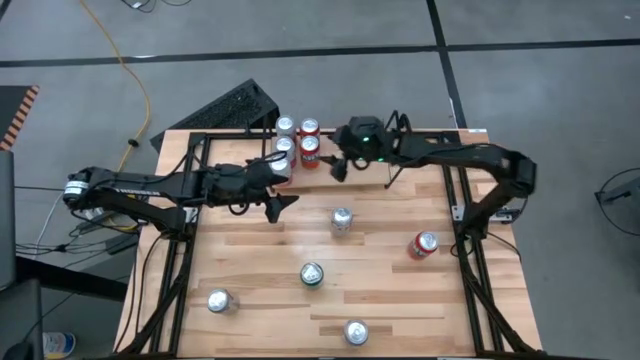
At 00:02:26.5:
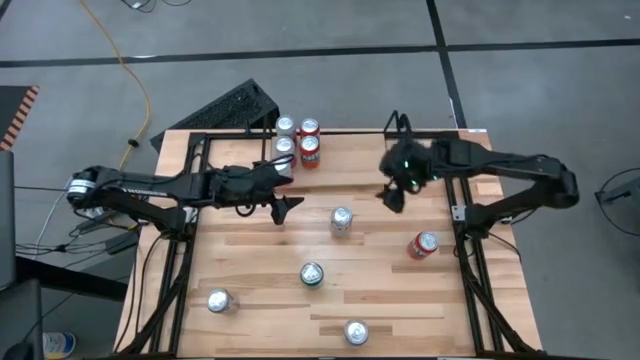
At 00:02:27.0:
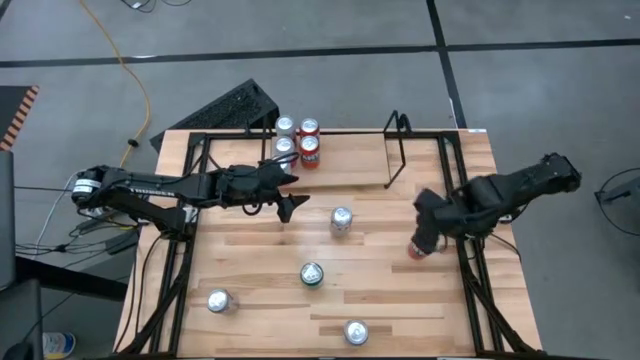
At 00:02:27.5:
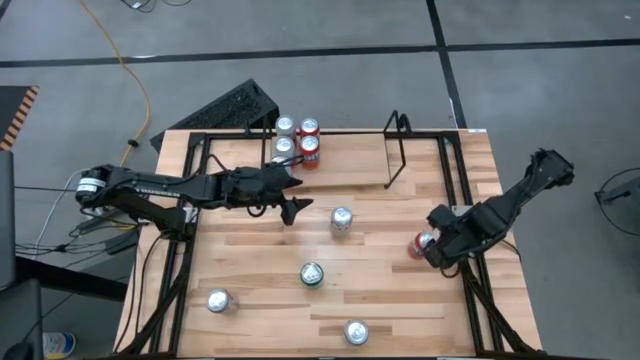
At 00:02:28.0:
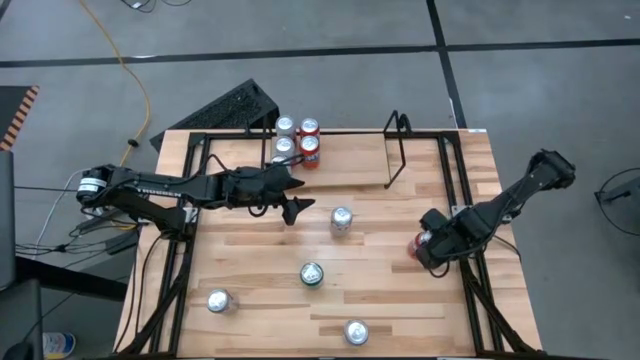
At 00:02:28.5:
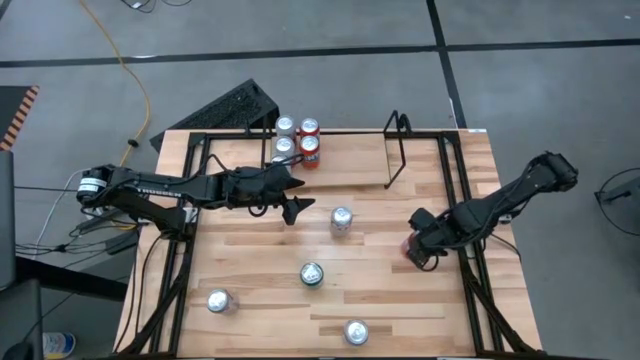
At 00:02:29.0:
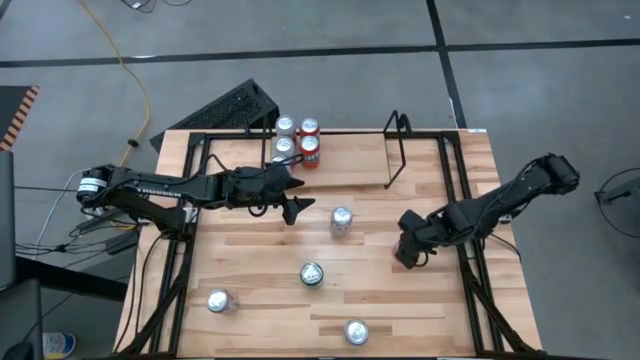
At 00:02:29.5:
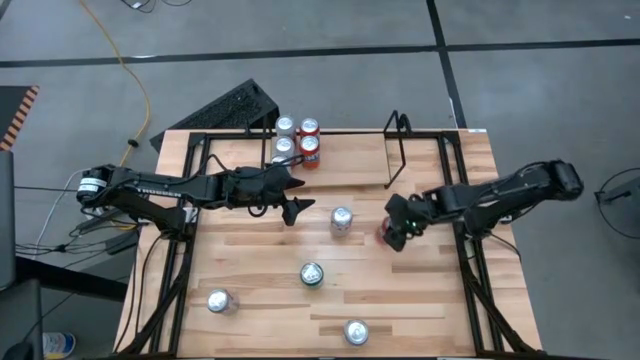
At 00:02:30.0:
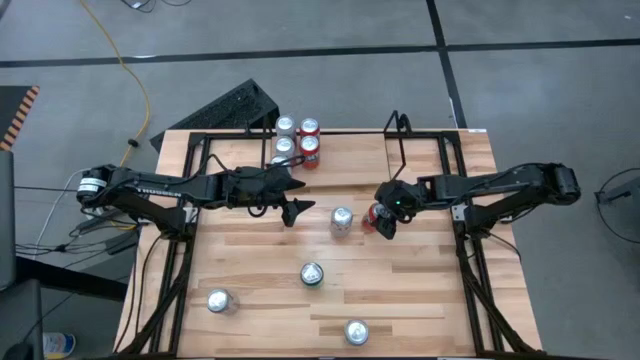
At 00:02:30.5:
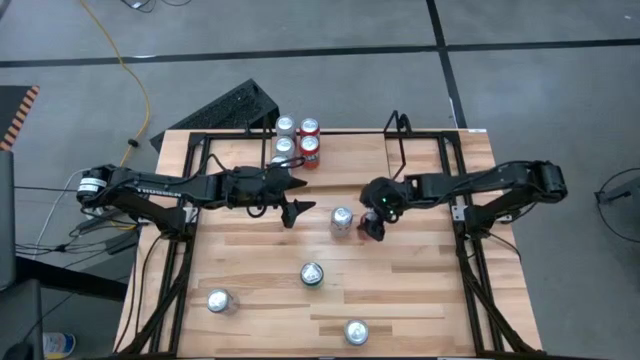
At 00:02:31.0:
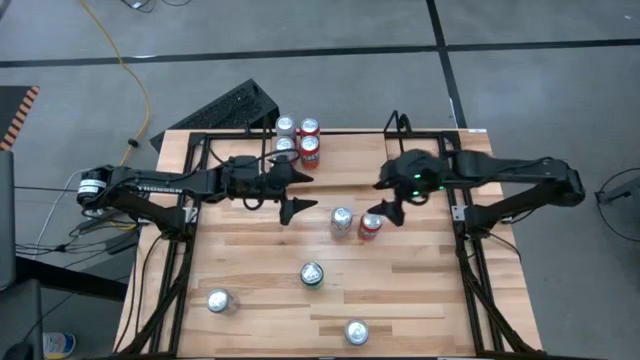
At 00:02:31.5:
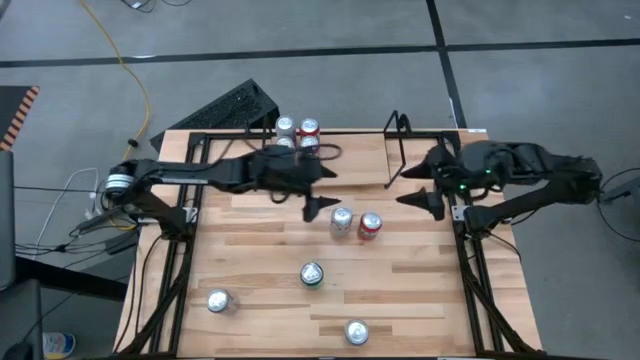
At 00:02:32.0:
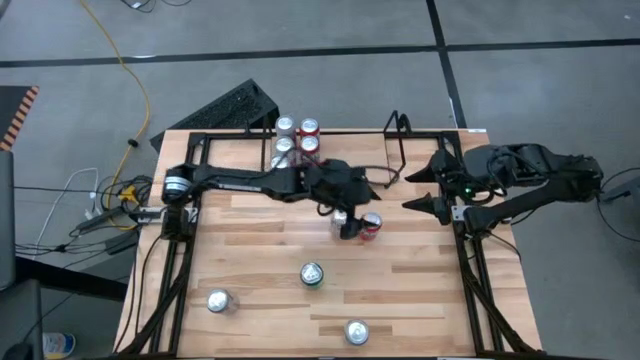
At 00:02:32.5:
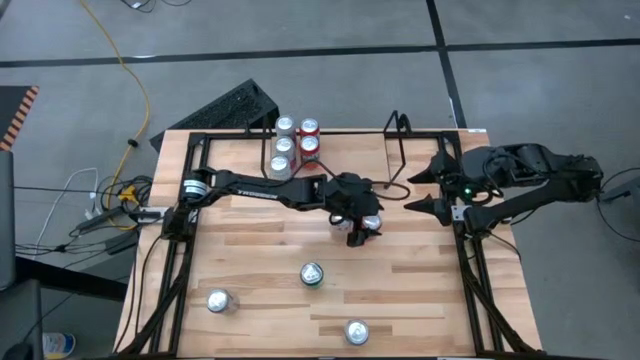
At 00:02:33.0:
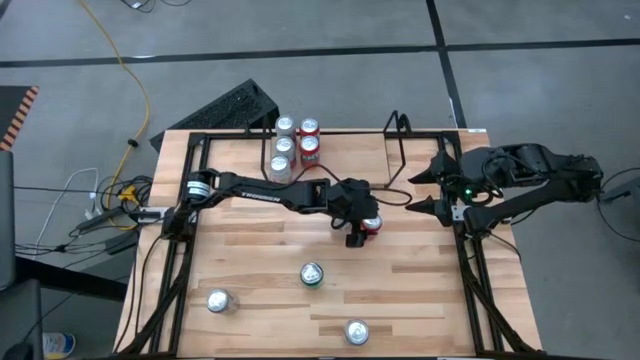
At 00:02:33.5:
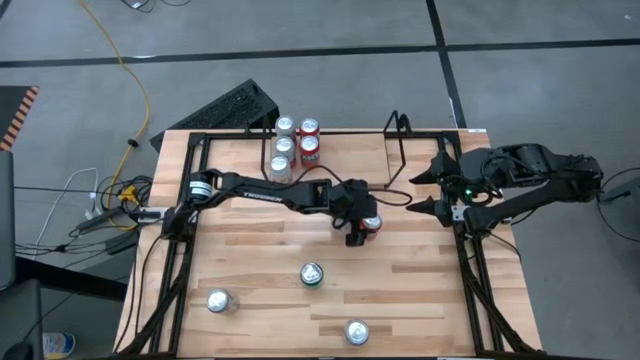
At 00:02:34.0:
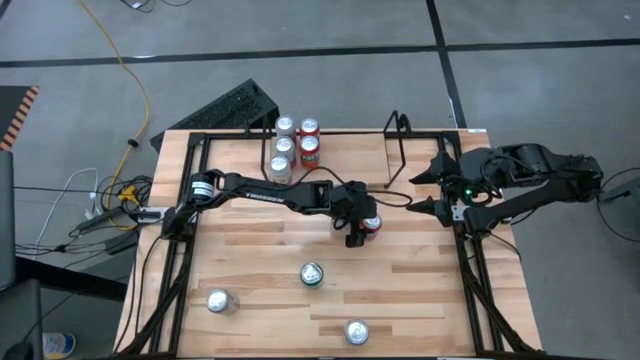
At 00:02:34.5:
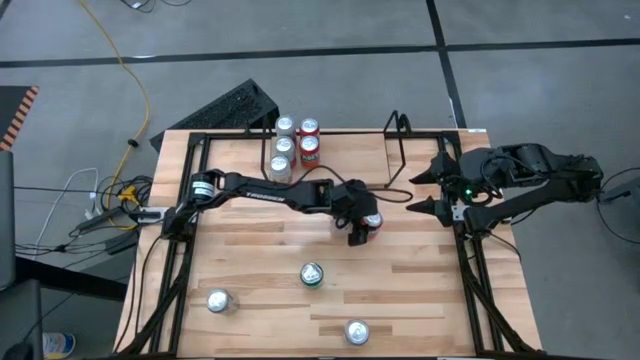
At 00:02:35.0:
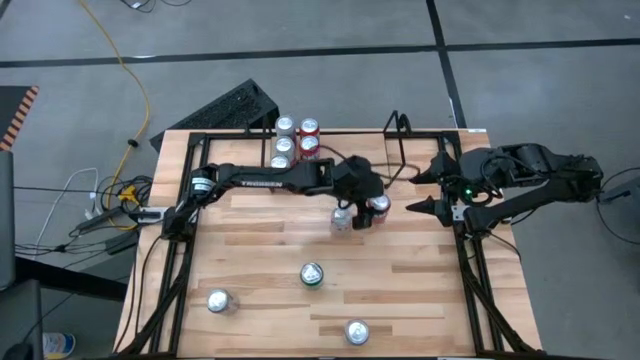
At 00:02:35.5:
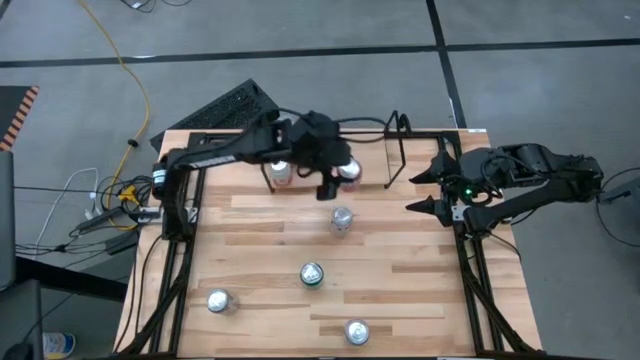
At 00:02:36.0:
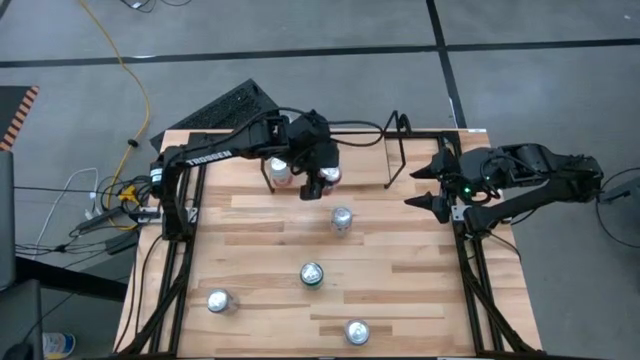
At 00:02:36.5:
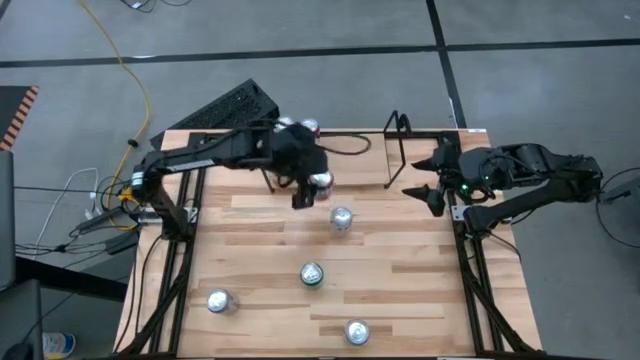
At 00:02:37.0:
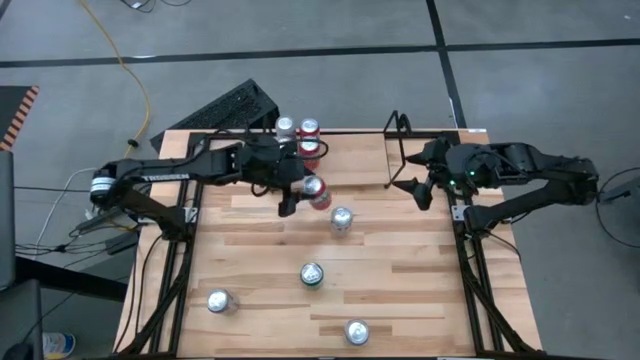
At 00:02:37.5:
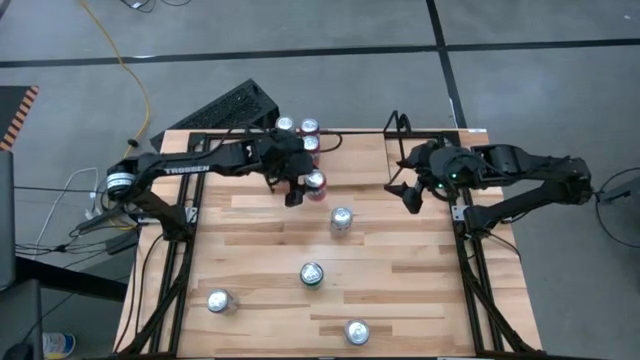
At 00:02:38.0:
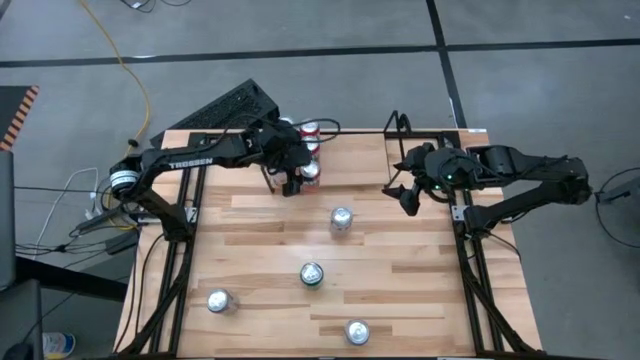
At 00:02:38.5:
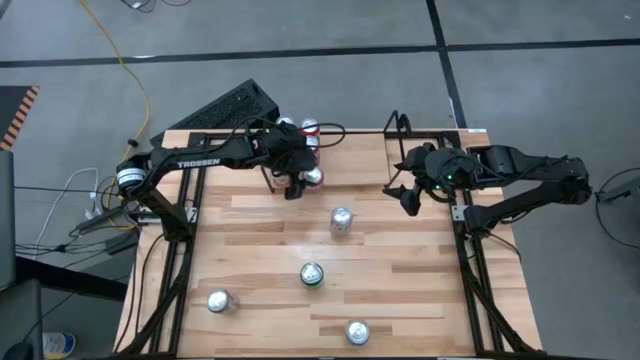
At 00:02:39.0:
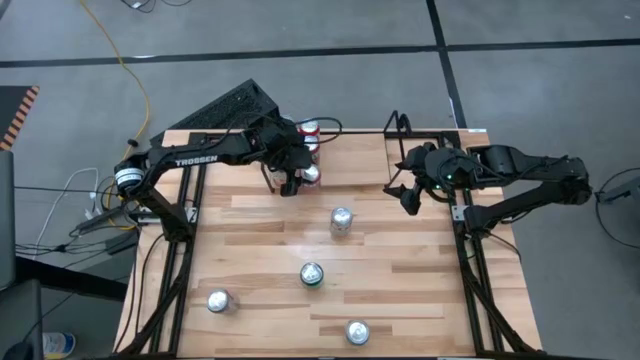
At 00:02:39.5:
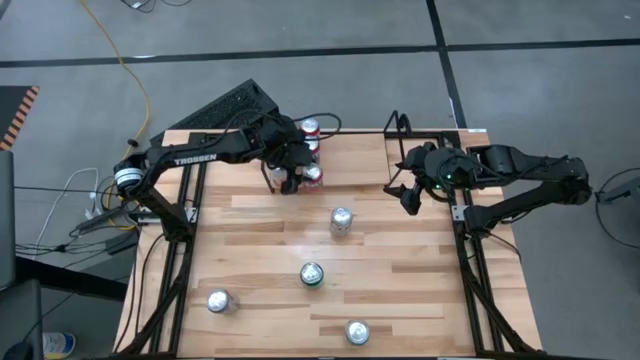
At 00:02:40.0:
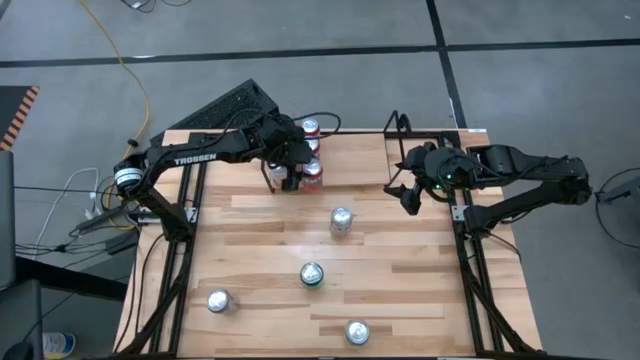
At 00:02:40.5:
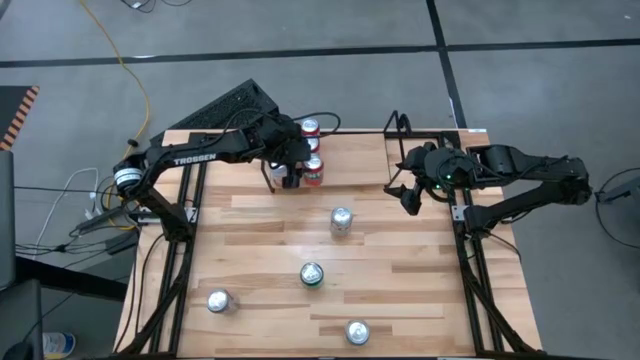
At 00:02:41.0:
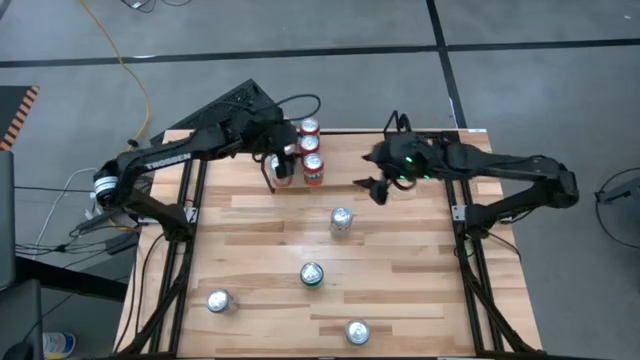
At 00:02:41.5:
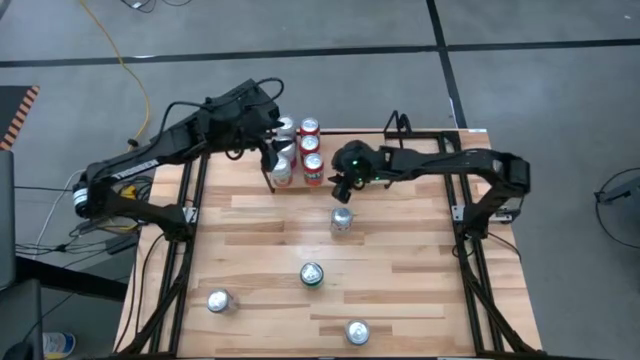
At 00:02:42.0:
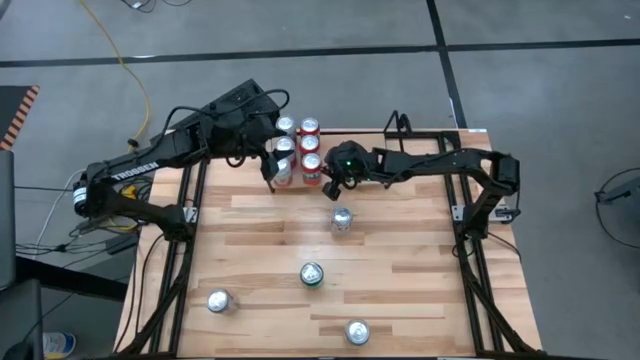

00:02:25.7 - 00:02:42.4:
Task: Place canned beverage on shelf
Put the red soda can on the shelf aligned with the other red soda cans
